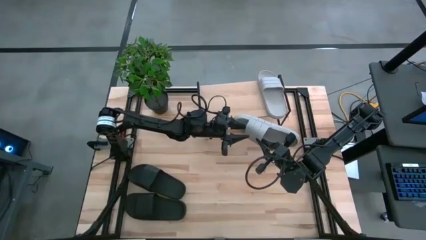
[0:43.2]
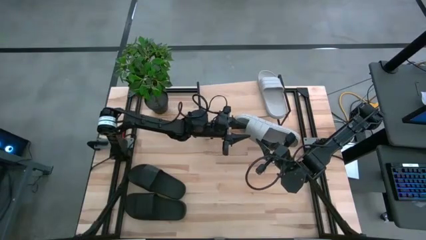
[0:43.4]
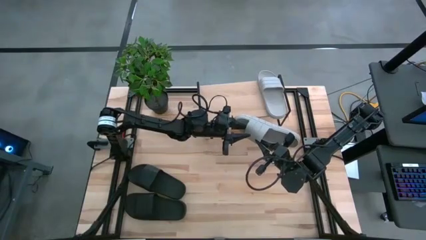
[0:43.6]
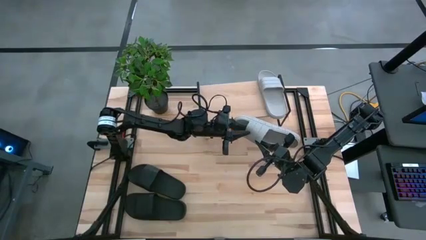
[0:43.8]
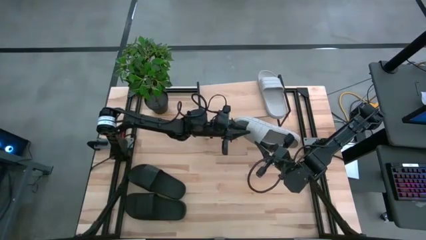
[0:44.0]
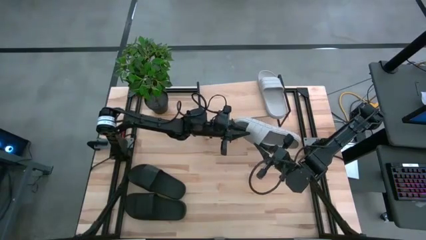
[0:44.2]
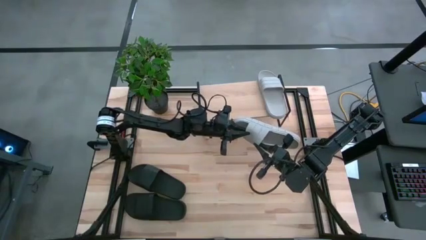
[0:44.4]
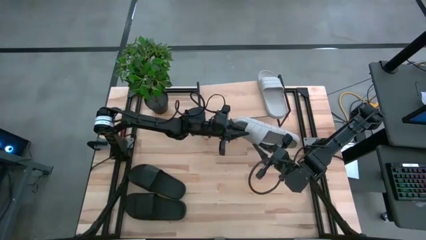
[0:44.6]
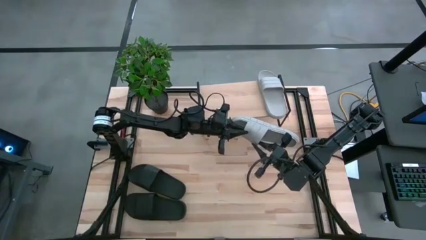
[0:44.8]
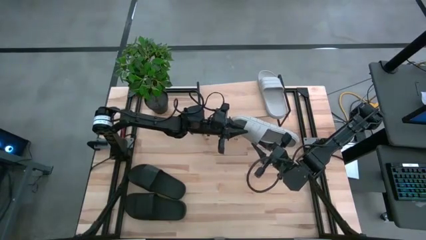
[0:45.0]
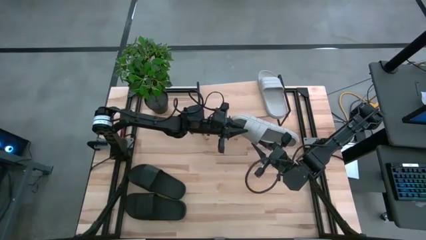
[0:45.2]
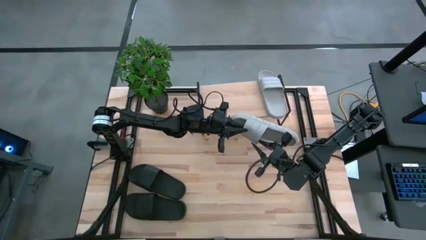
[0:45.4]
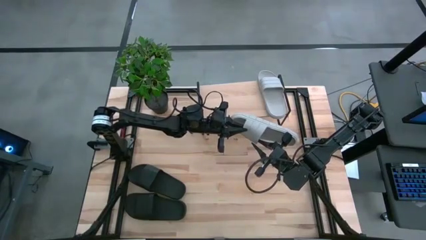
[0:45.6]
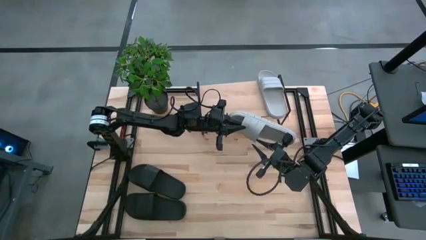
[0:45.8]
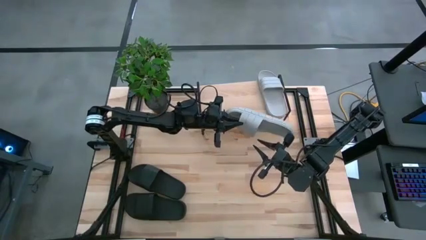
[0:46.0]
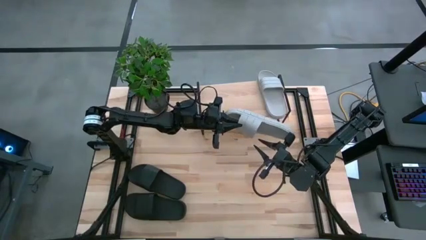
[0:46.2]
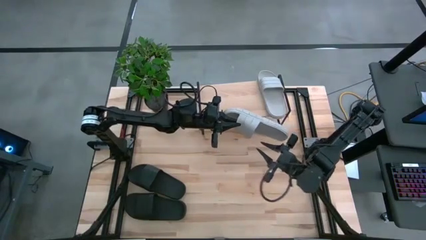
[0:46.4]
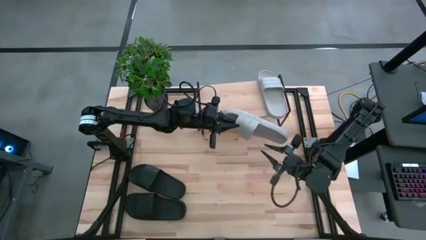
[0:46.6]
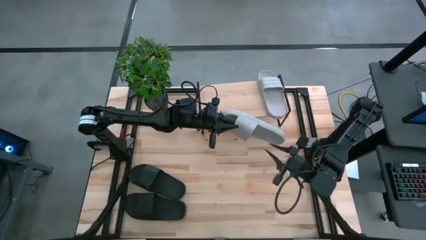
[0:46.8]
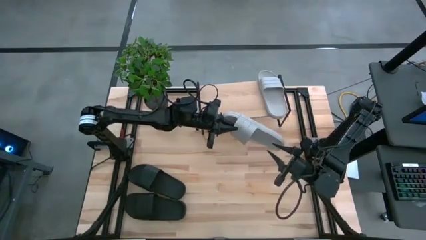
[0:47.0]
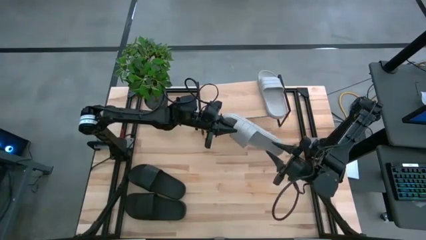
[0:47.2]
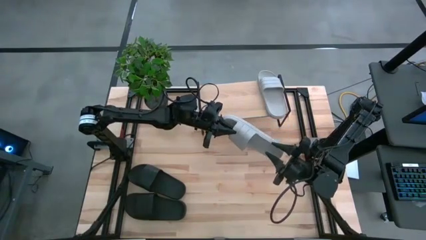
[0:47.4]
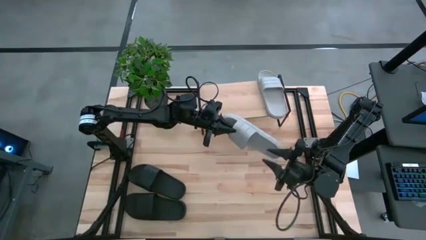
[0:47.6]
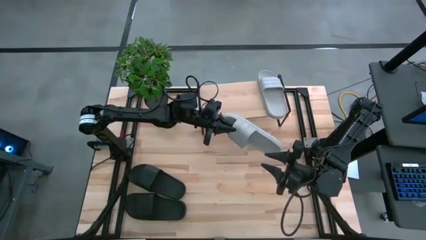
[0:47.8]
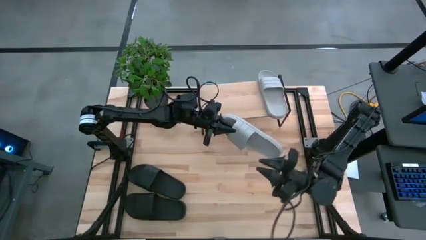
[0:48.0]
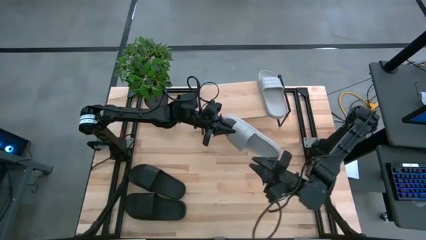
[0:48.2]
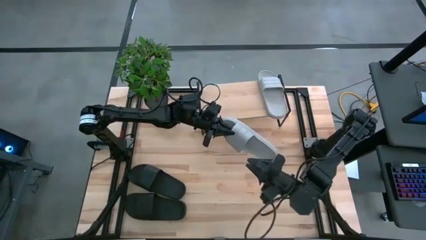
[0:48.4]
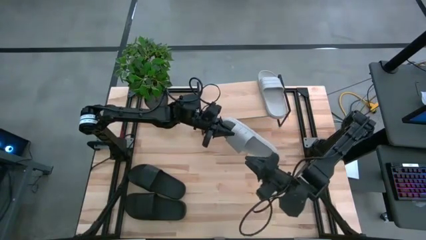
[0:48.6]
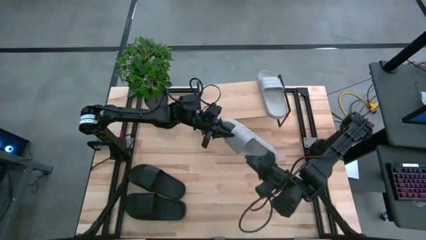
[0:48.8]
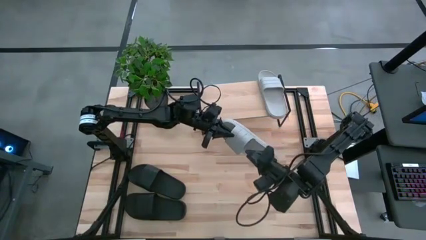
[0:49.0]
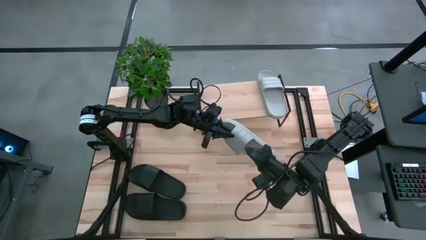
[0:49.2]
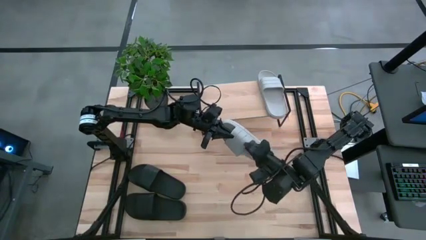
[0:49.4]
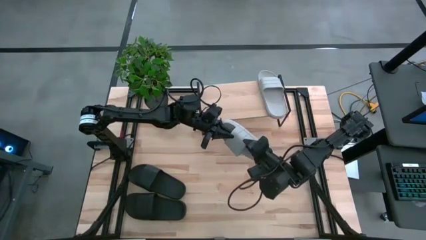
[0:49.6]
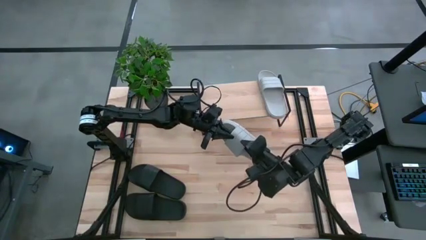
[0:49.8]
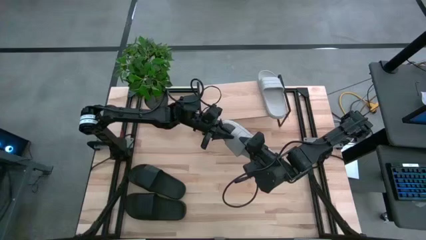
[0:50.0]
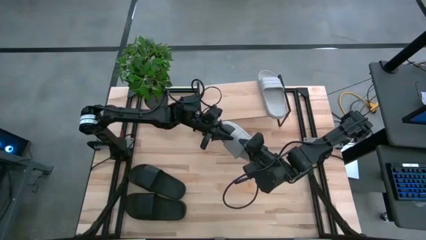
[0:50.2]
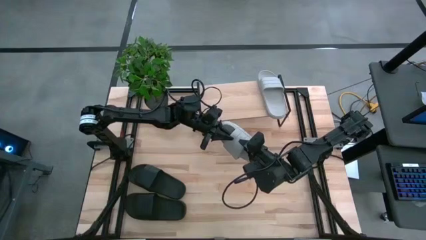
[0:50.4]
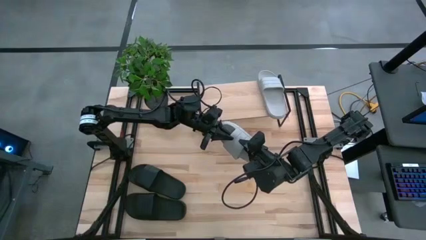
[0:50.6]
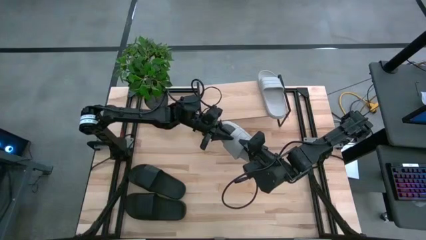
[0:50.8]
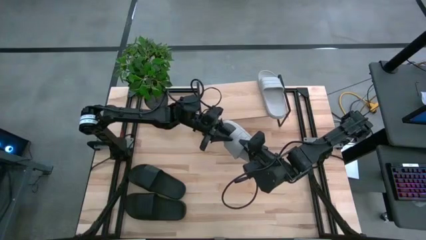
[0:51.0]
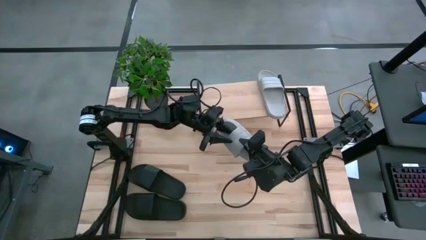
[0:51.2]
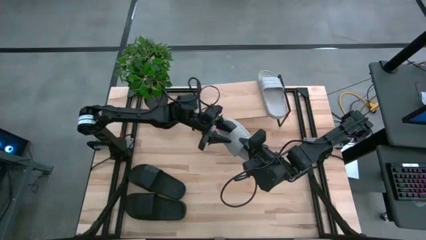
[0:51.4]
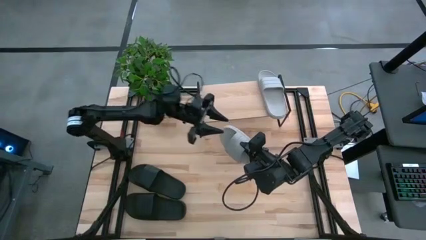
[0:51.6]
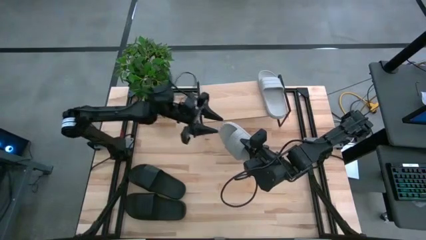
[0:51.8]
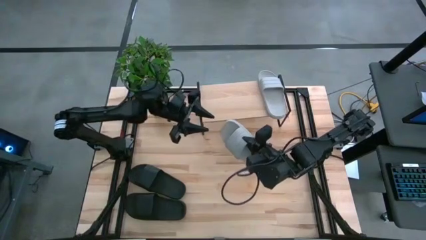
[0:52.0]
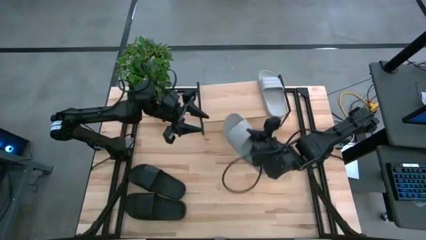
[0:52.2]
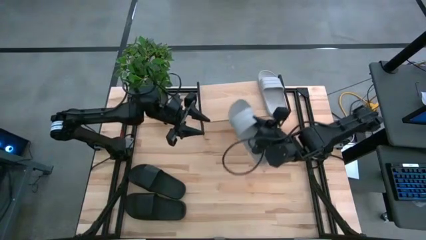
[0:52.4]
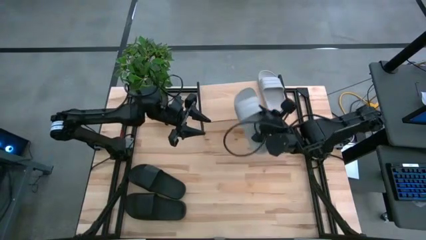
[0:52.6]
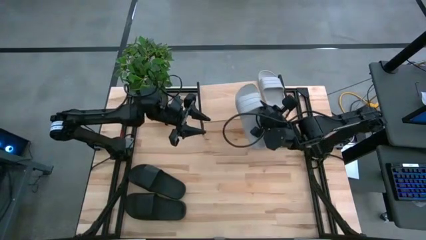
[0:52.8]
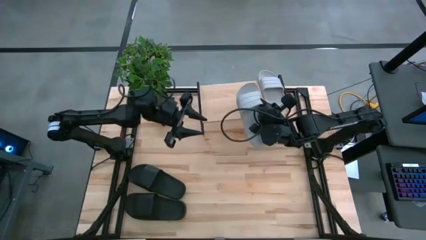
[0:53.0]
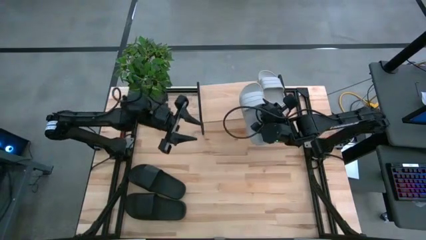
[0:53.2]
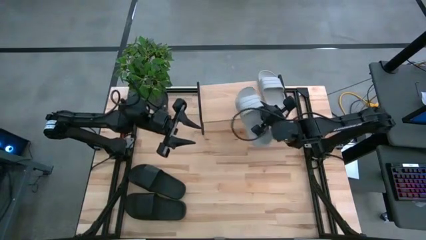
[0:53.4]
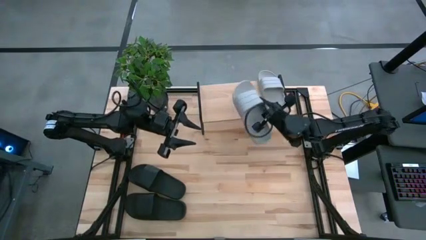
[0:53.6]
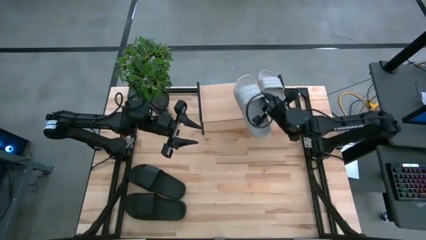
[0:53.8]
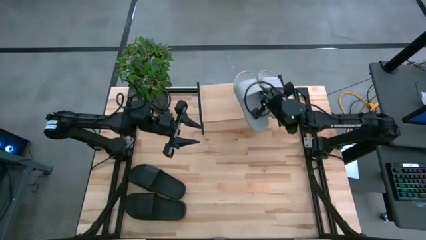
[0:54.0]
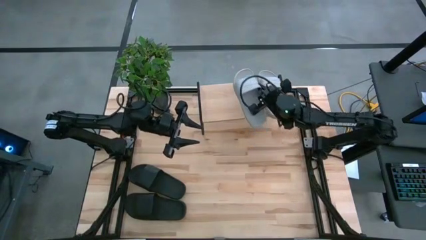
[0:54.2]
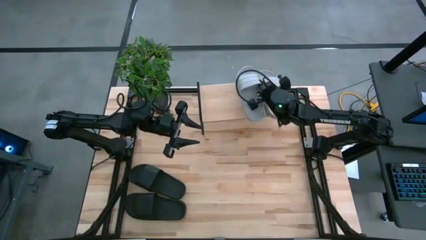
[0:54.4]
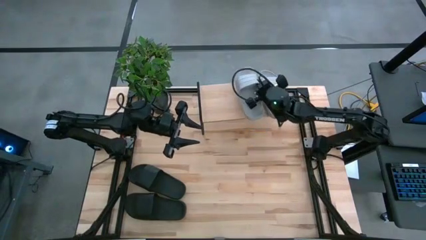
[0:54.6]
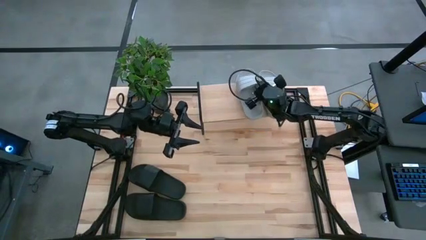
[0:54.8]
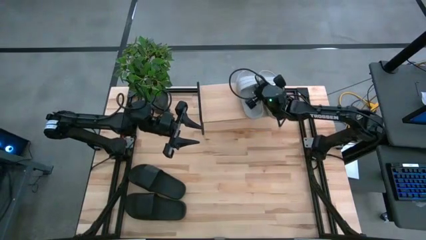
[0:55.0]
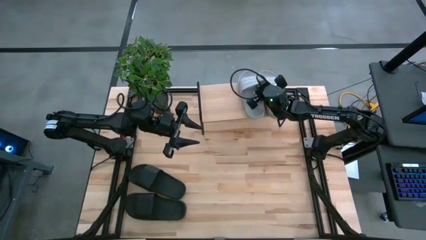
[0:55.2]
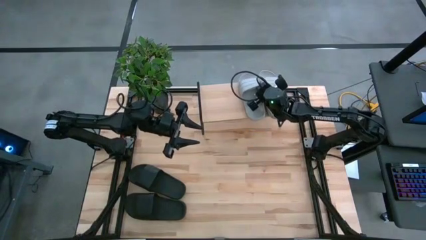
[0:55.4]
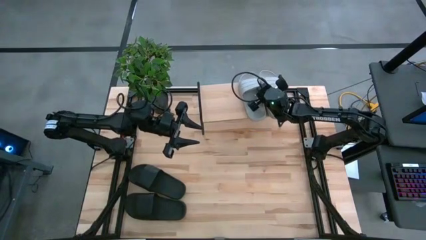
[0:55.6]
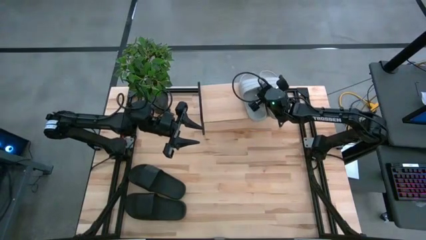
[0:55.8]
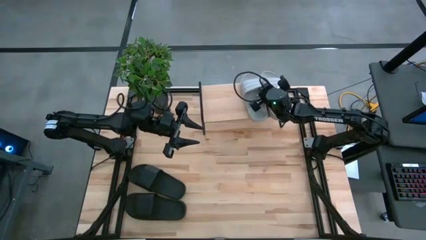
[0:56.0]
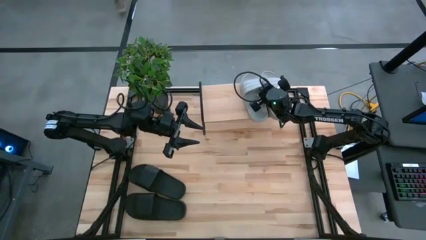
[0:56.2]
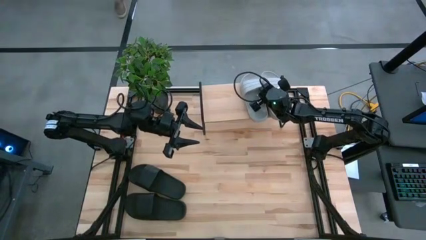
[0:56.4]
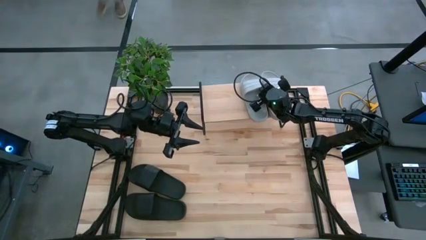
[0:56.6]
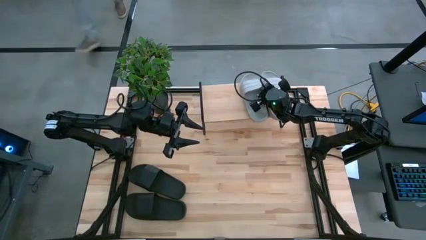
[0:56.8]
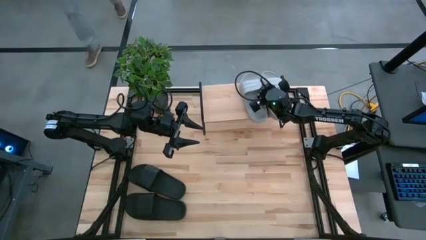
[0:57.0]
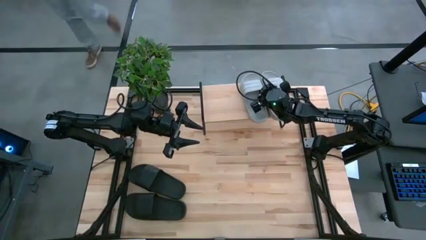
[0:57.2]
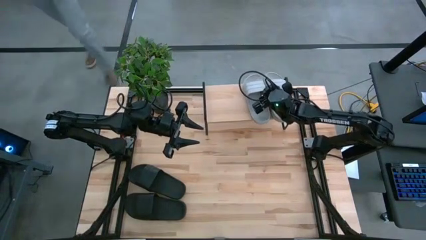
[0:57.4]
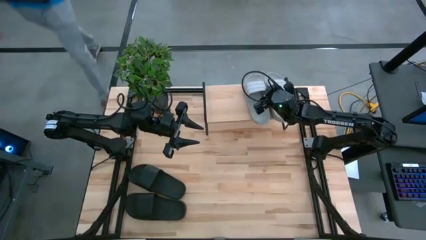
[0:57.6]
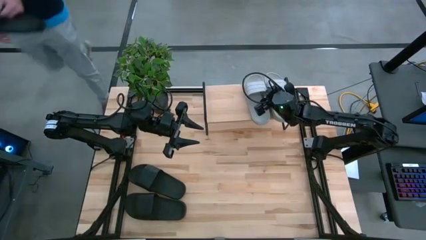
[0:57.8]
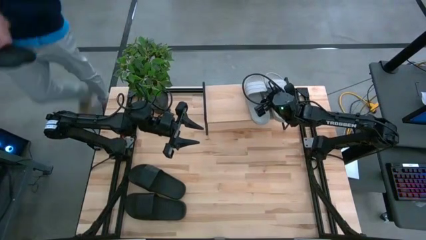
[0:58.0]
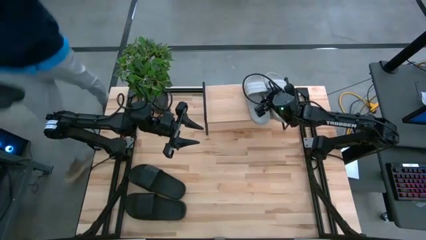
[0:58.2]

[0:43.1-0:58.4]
Task: Pick and place slides into the shelf
Put the gray slide on the shelf

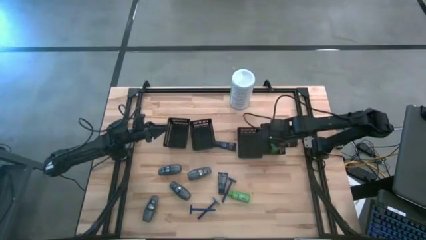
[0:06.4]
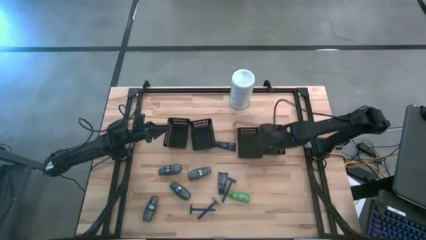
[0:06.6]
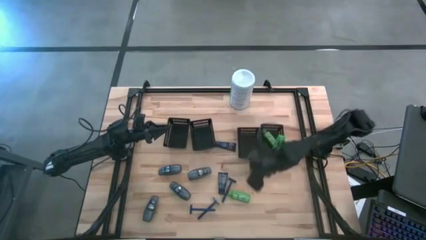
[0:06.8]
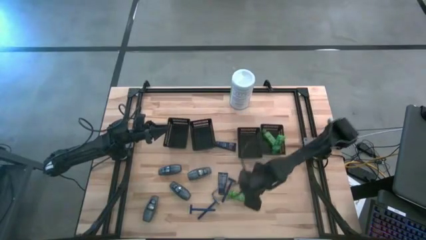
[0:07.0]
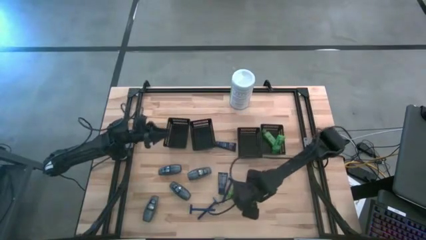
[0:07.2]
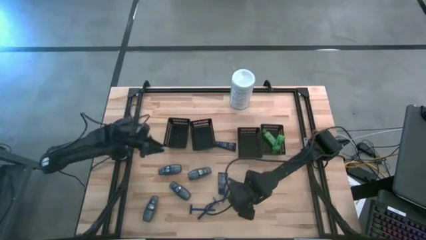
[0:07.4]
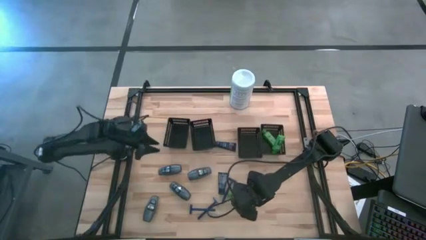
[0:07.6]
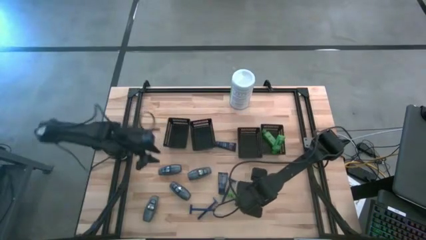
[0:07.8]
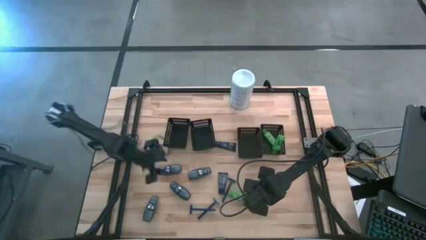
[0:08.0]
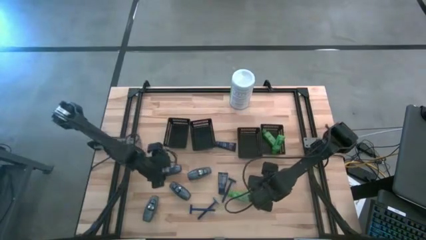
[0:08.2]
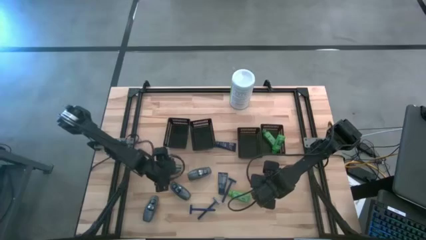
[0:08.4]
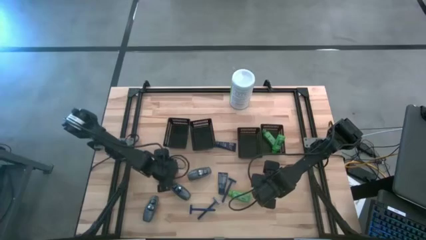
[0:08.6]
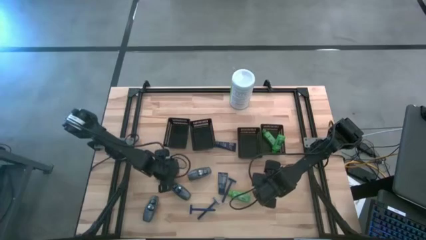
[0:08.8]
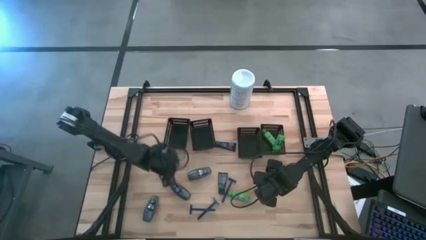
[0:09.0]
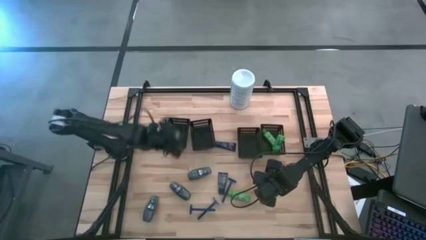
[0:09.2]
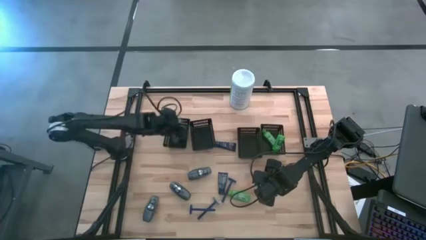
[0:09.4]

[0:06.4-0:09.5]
Task: Pick & Place Travel size toiletries
Put the gray deodorant into the left black bin
